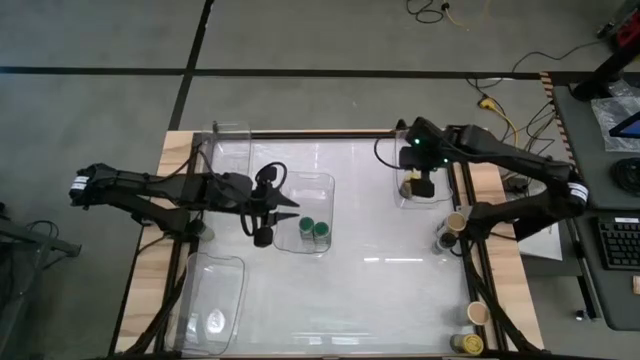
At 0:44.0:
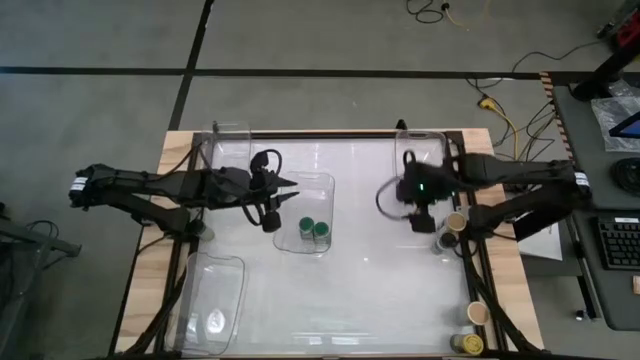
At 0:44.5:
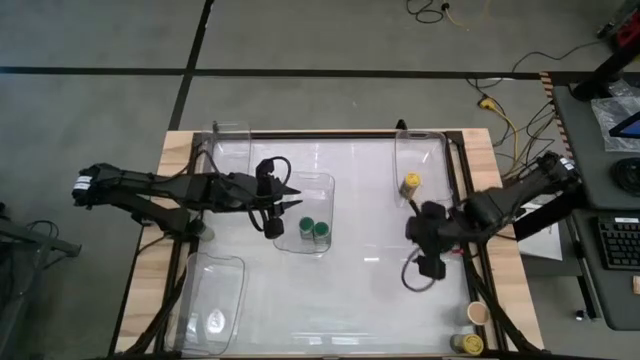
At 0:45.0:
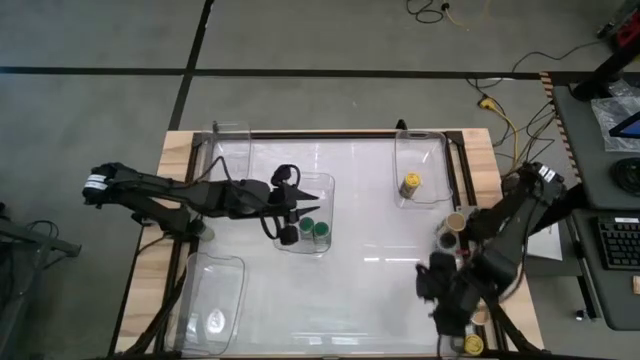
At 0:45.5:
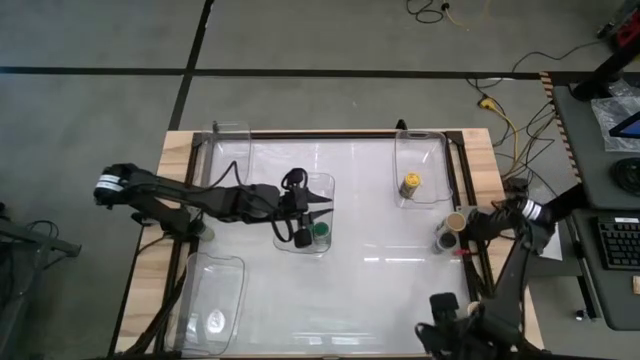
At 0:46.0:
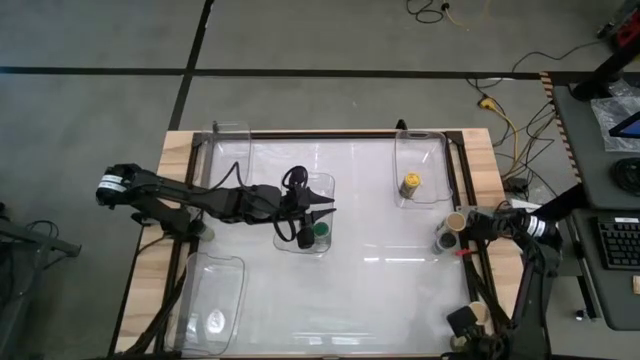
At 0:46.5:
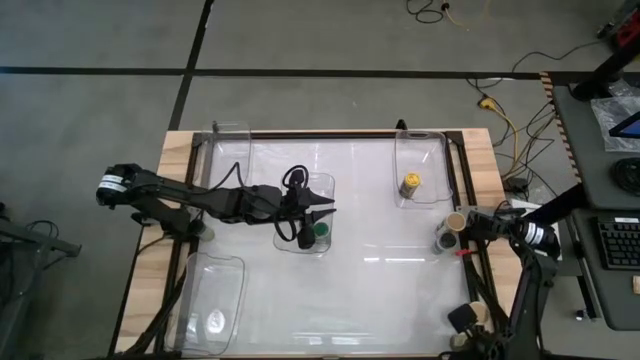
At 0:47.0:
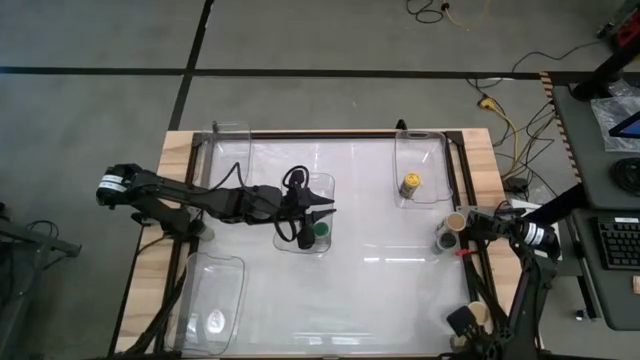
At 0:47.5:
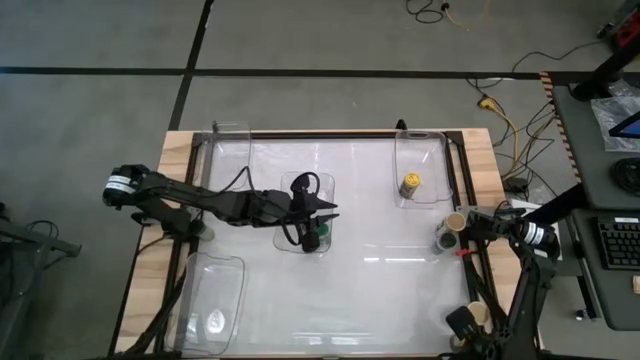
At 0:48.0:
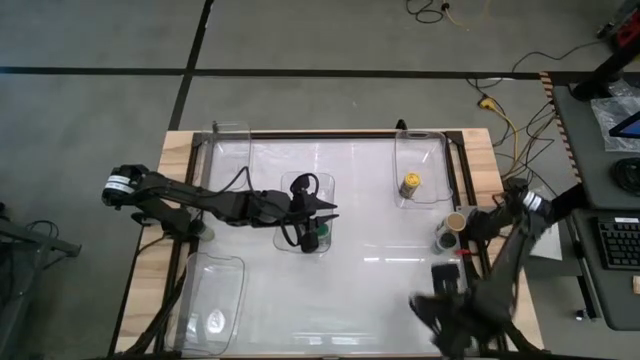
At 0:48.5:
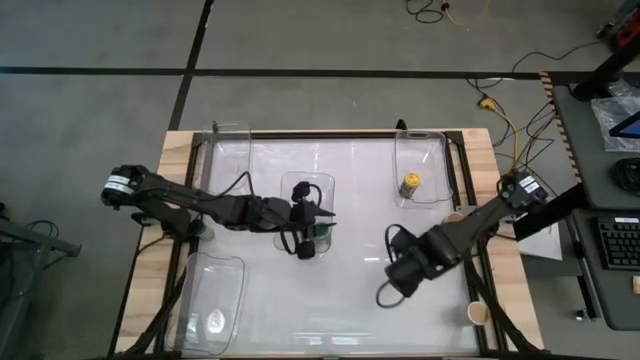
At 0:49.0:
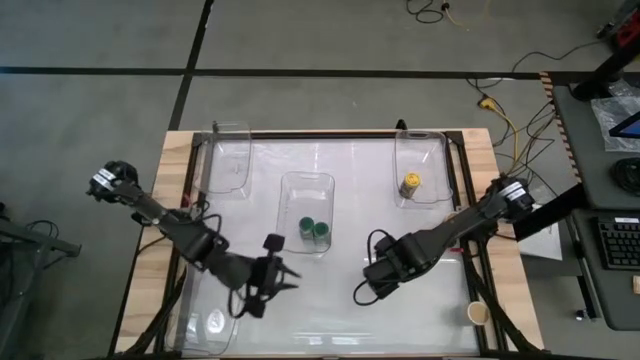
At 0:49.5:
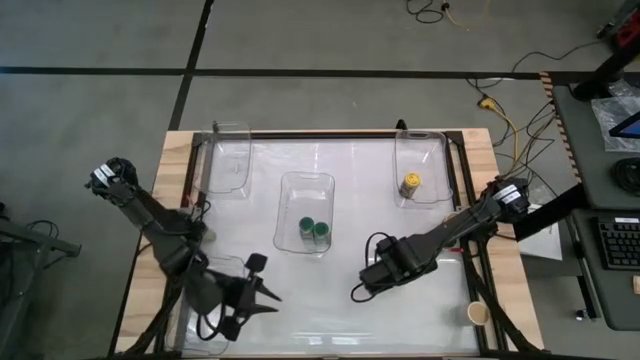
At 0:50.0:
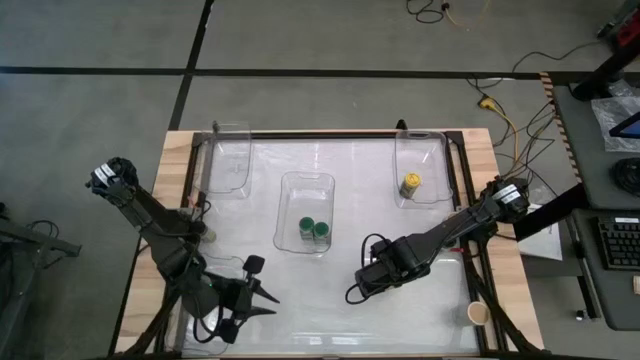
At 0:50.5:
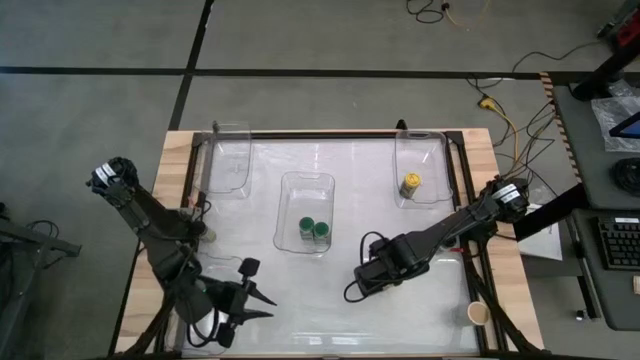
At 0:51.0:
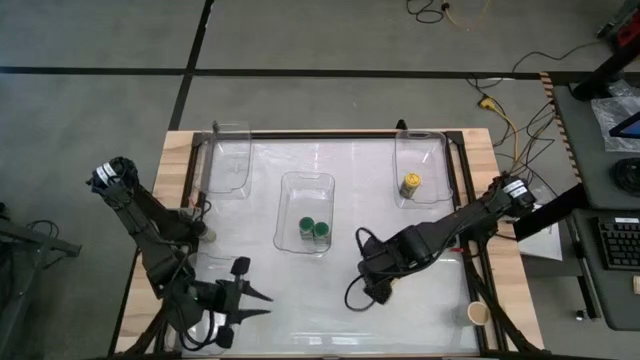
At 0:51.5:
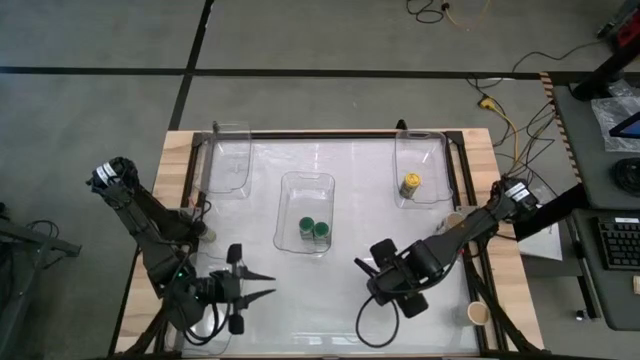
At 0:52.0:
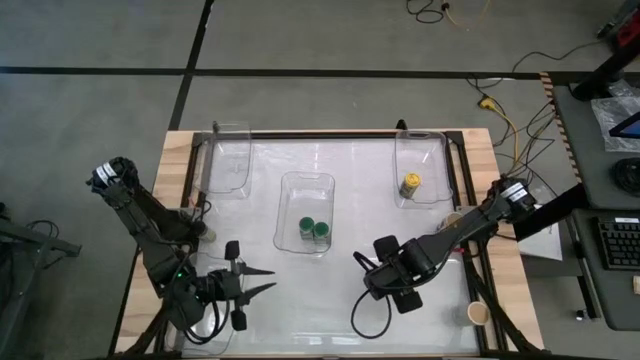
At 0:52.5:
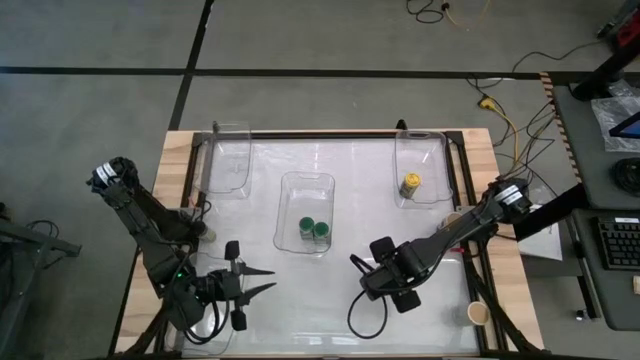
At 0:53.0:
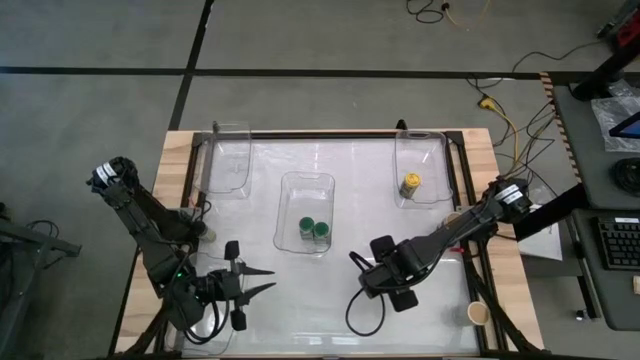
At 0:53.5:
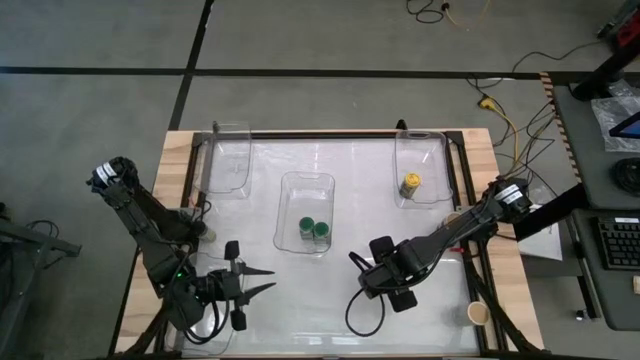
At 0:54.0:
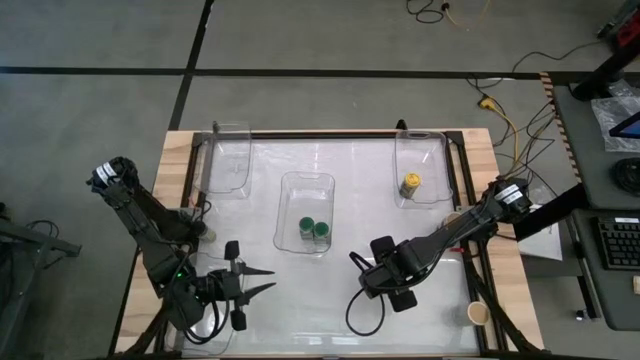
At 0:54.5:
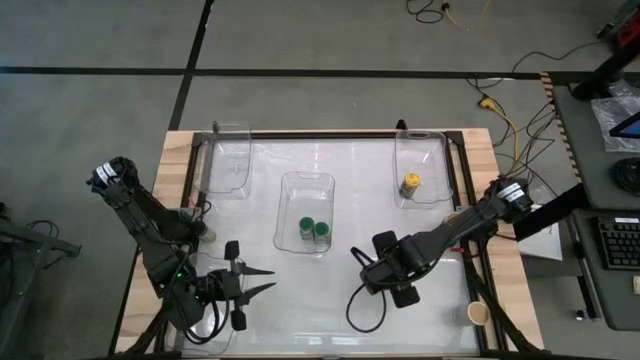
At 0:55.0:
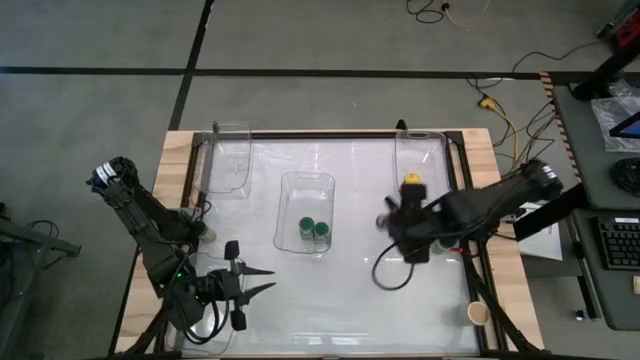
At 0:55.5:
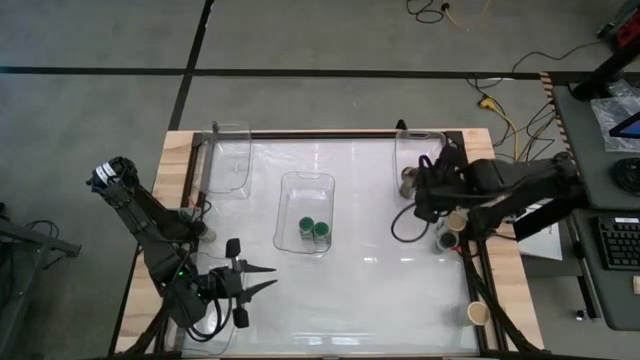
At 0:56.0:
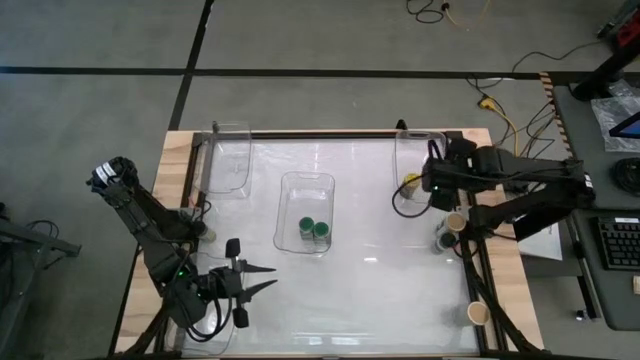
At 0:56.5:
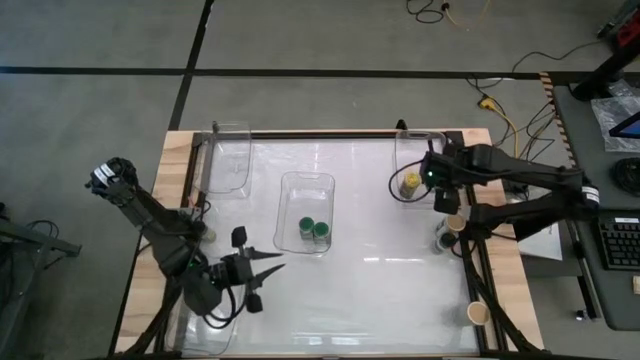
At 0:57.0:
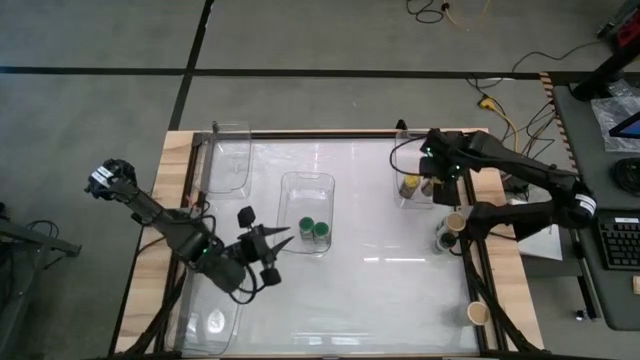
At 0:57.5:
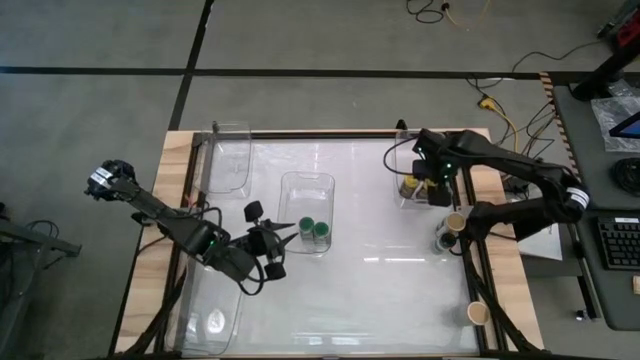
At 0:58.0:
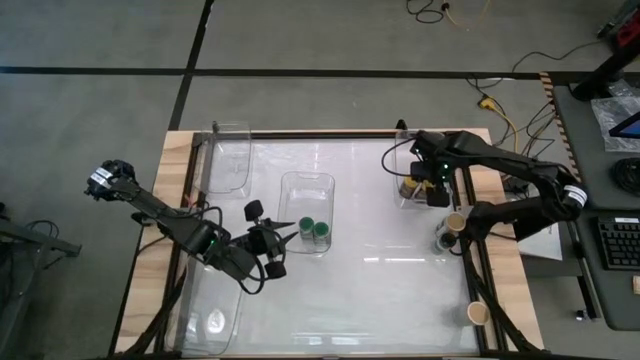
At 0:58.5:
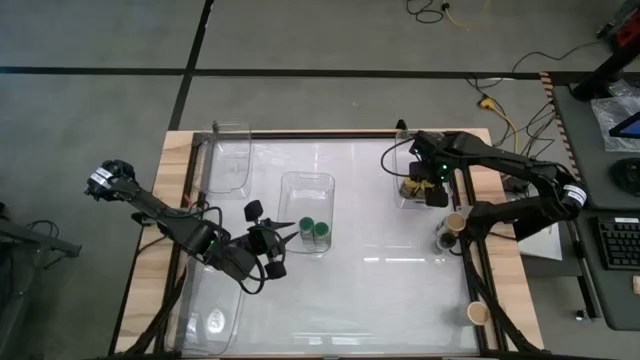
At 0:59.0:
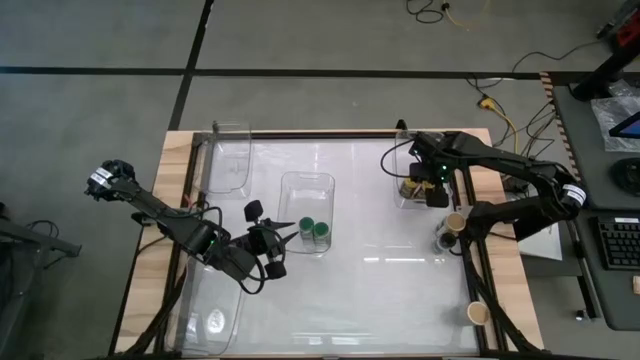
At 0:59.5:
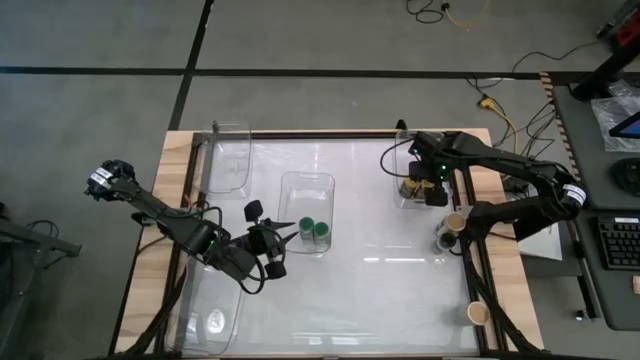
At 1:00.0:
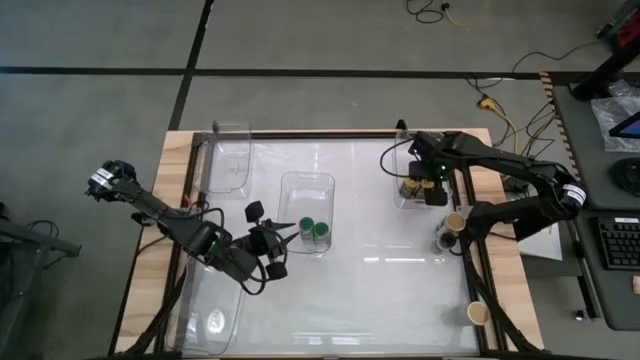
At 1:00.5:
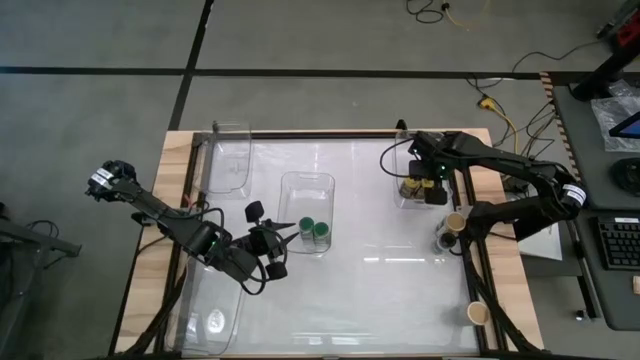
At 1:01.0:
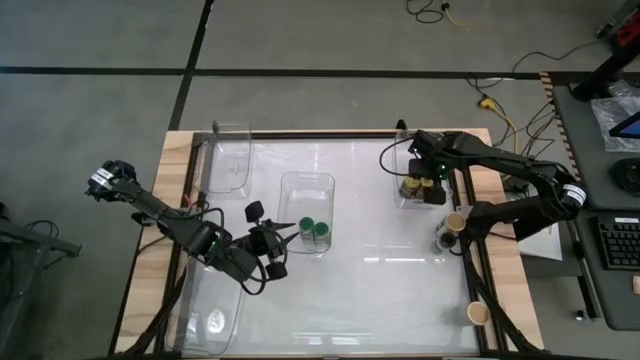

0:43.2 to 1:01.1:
Task: Sort spices by type
Put the yellow seasoning bottle into the top right transparent bin

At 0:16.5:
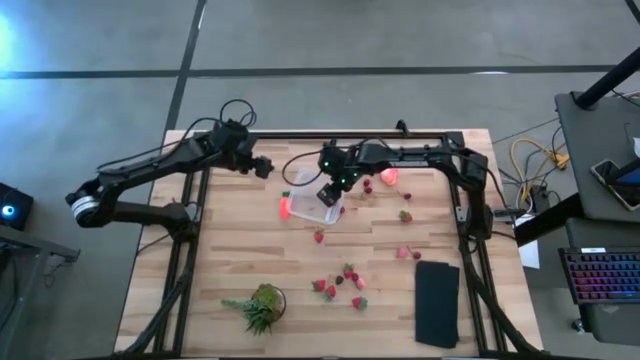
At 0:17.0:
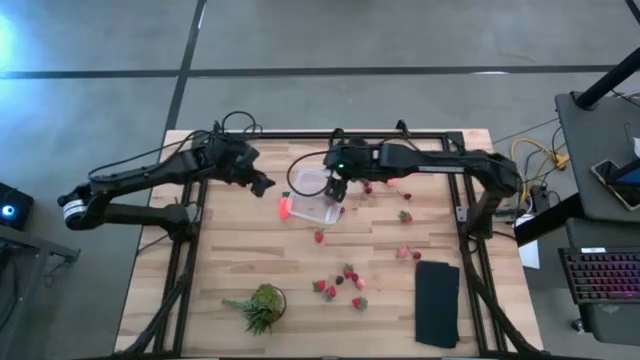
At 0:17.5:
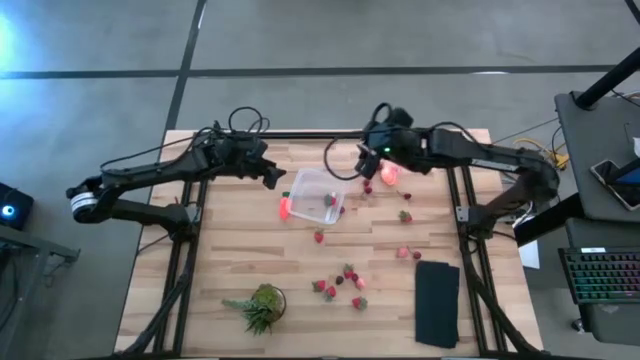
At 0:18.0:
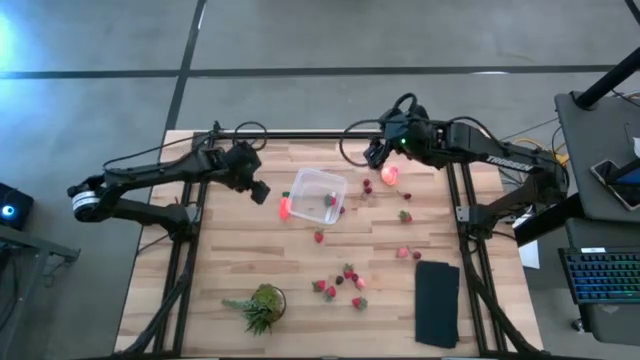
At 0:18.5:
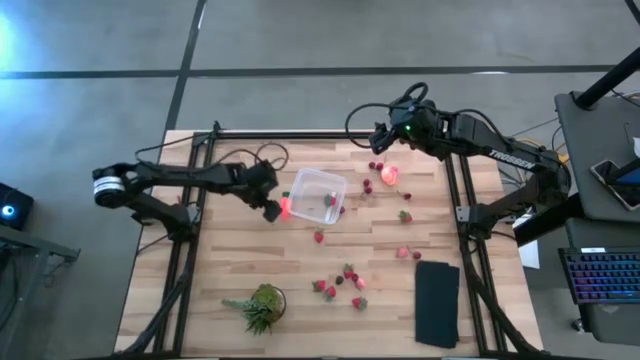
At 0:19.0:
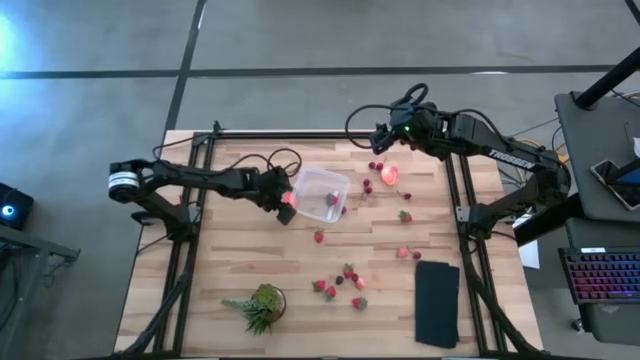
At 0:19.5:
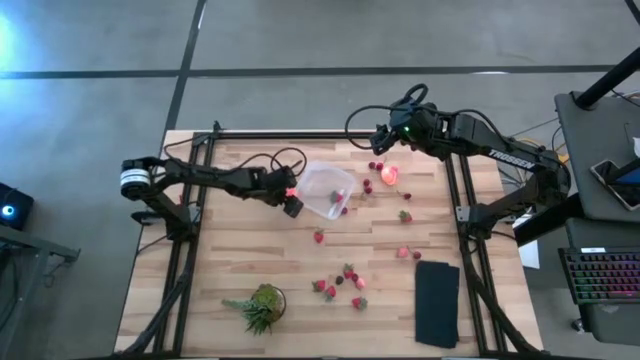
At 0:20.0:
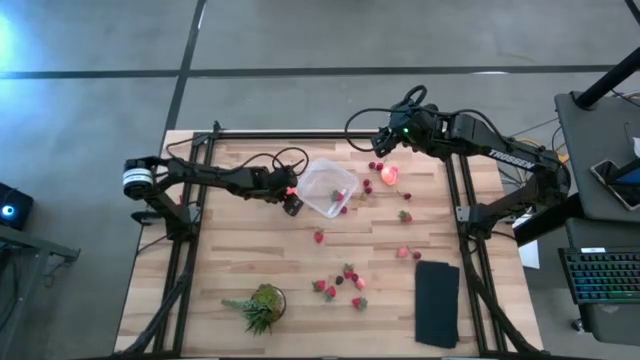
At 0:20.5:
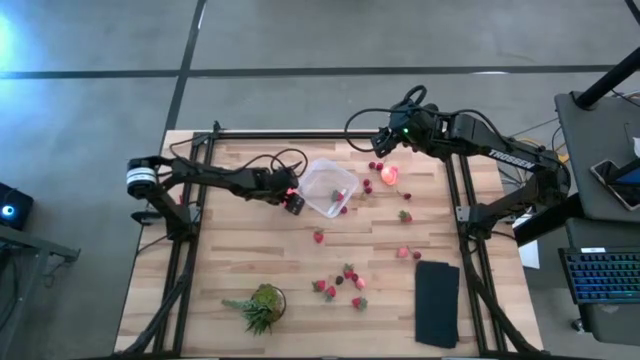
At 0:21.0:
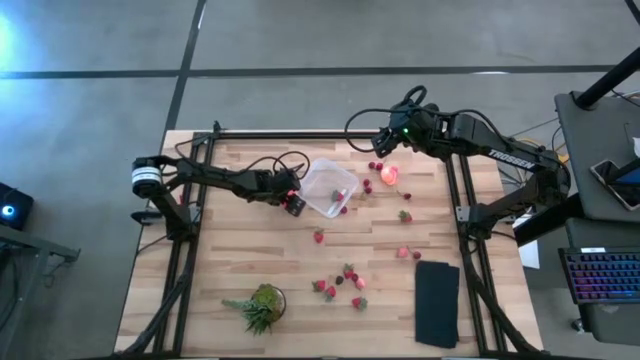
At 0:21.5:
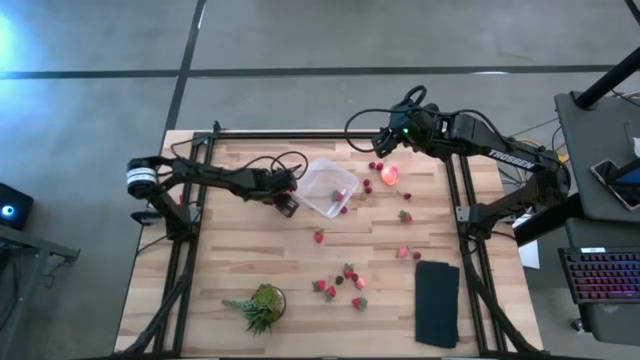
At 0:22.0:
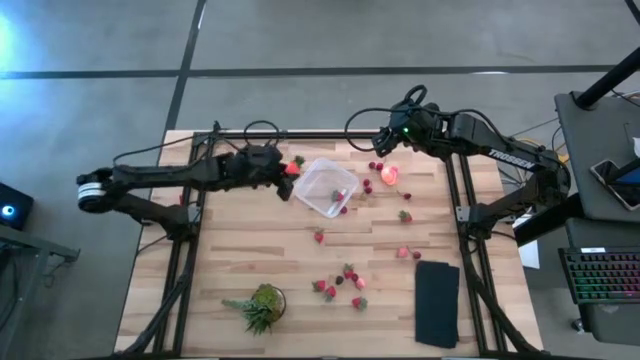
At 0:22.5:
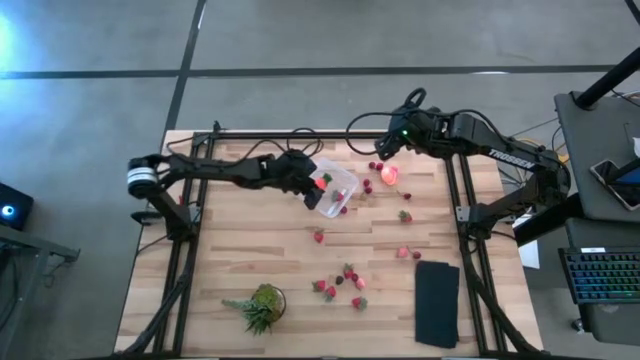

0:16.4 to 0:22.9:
Task: Pick and placing Produce into tupperware
Put the orange carrot into the transparent bin
